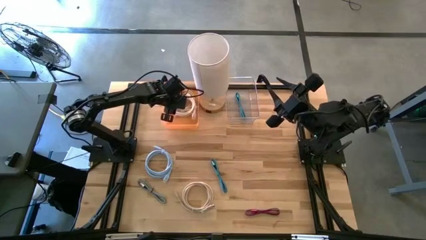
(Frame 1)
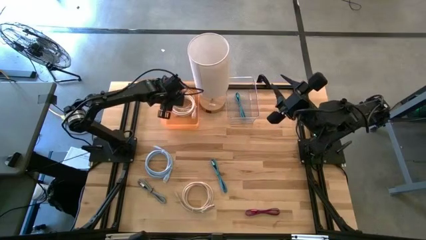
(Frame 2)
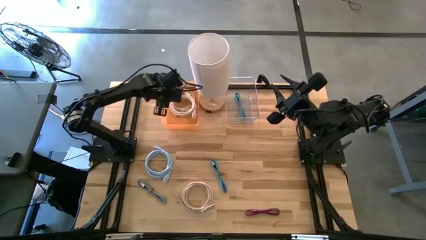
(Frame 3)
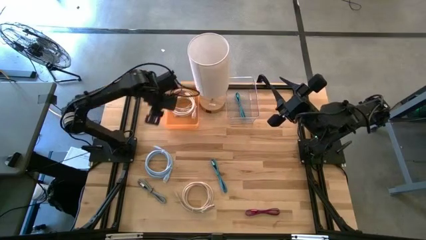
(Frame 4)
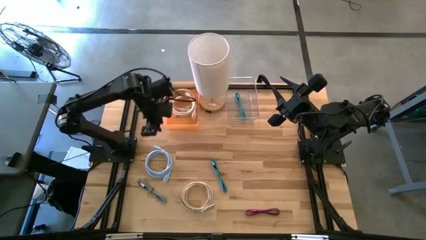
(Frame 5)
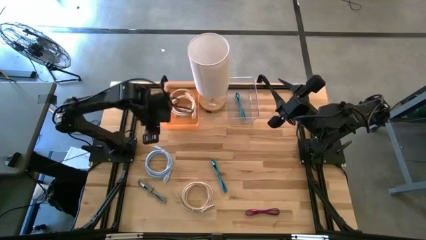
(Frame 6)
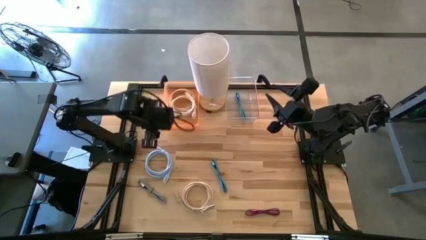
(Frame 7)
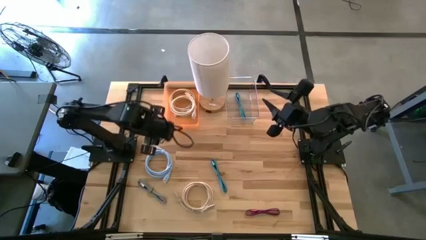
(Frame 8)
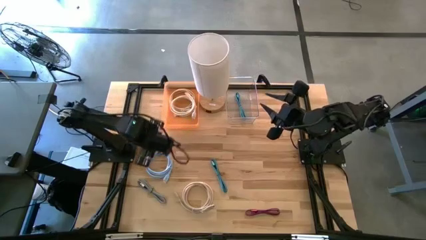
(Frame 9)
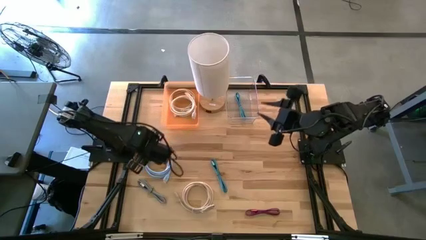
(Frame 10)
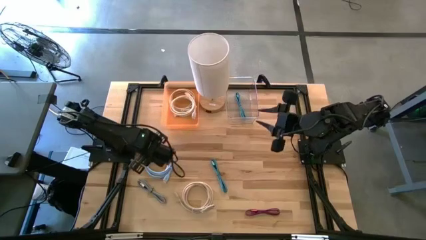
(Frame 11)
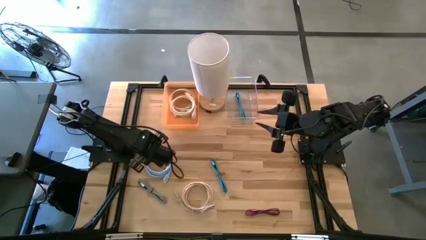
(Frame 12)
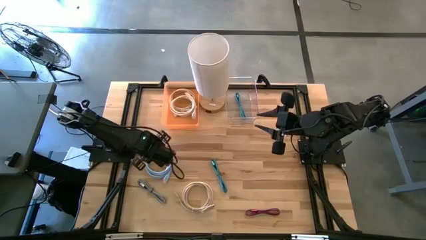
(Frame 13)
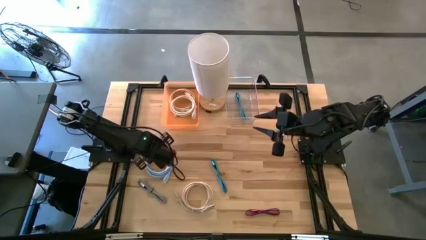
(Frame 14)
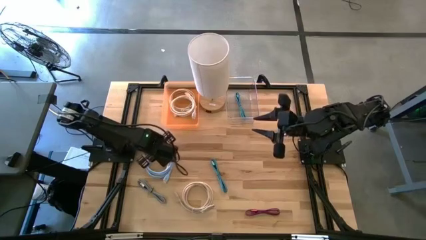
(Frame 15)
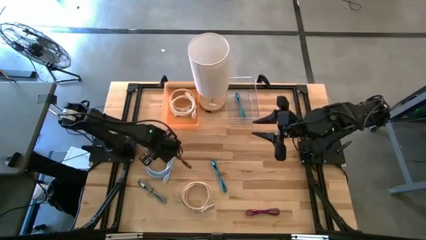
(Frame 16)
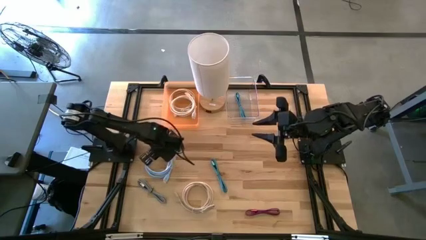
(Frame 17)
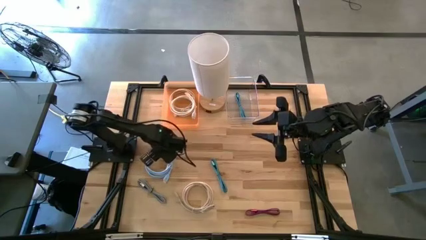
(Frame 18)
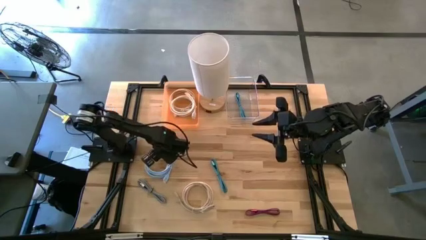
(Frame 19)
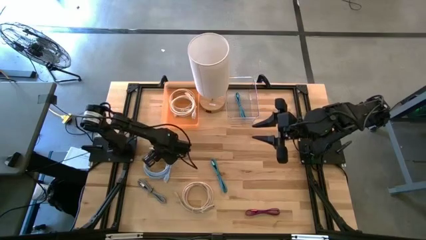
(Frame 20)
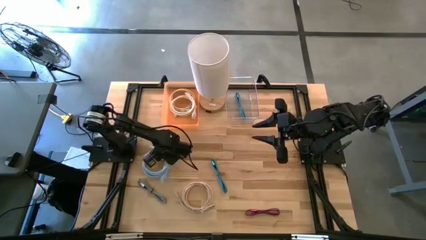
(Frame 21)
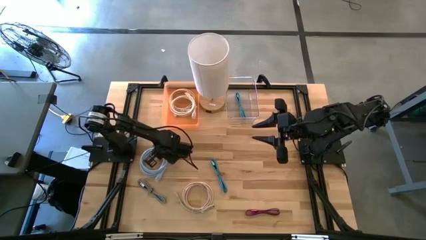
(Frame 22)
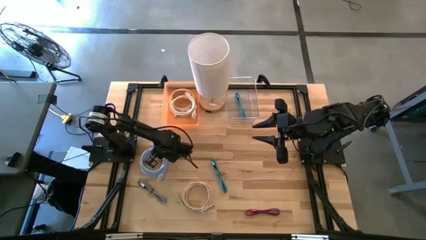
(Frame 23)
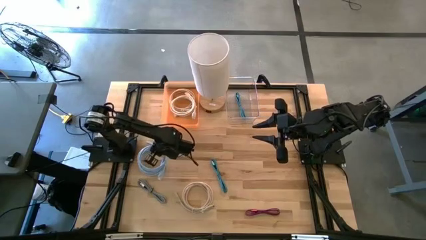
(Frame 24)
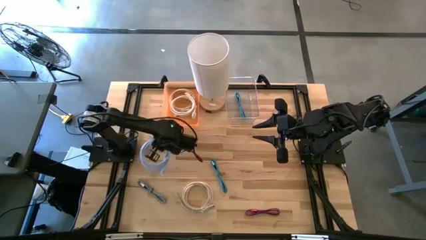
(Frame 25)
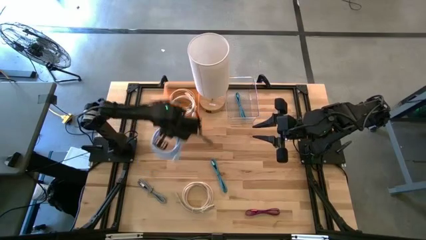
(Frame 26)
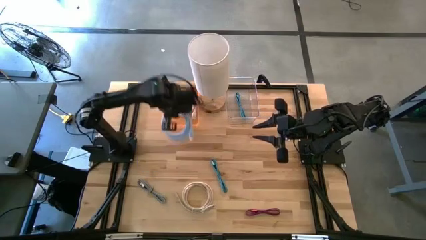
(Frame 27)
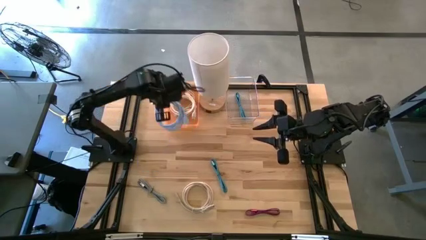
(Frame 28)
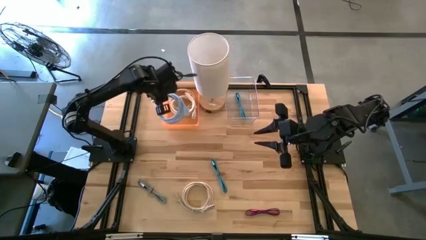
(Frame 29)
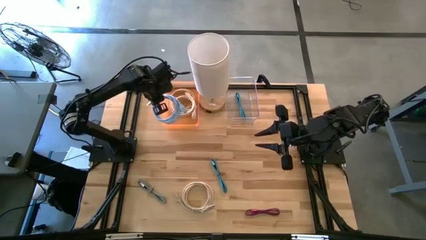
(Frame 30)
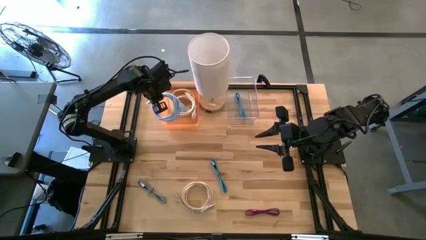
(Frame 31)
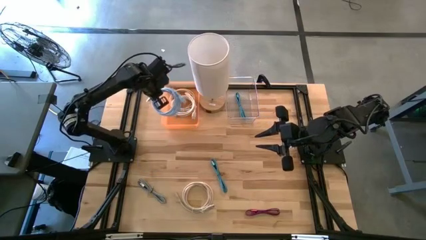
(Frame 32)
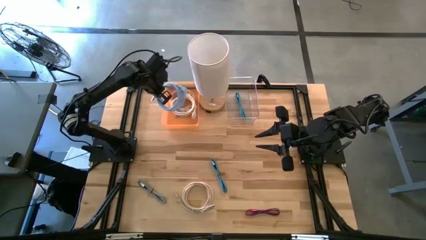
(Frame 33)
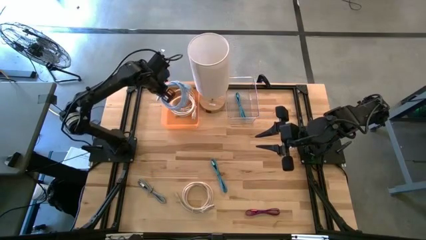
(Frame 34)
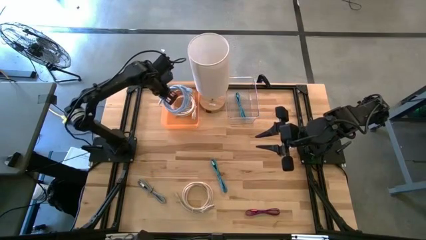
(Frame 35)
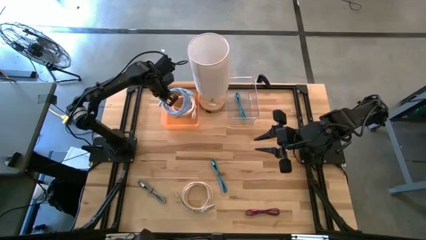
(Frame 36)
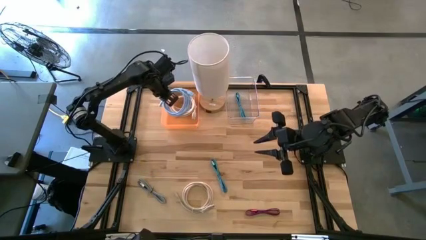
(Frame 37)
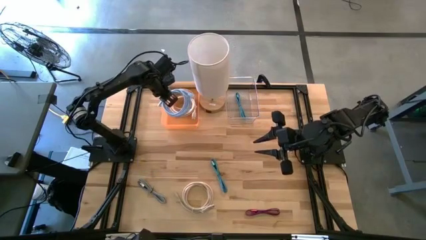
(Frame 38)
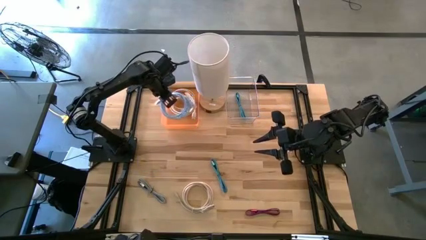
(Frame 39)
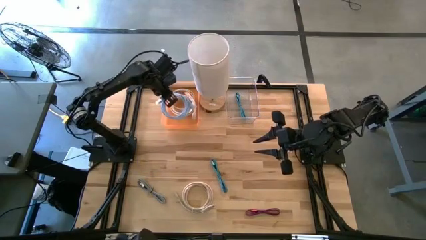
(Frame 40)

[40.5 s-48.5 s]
Task: Pick & Place USB Port
Put the light blue usb cable into the orange bin

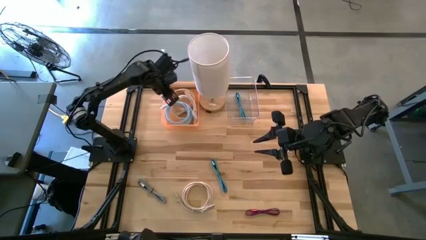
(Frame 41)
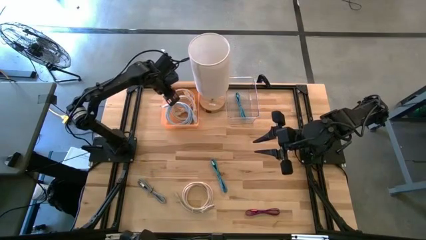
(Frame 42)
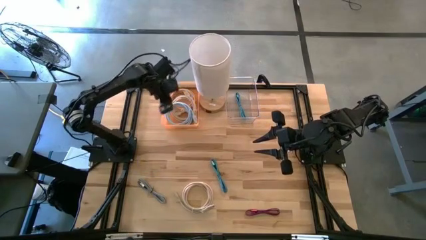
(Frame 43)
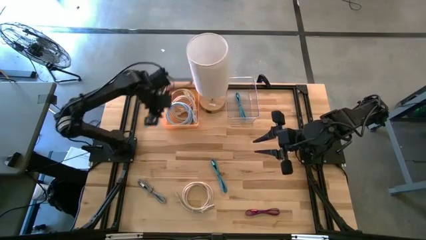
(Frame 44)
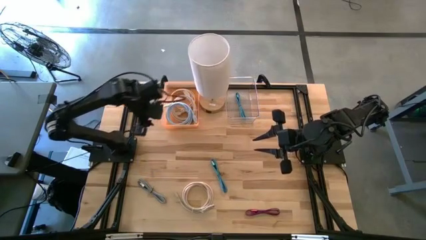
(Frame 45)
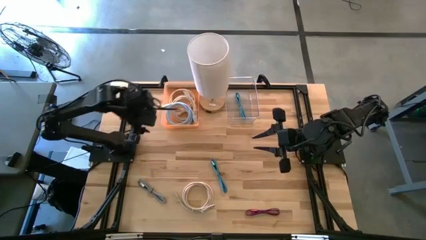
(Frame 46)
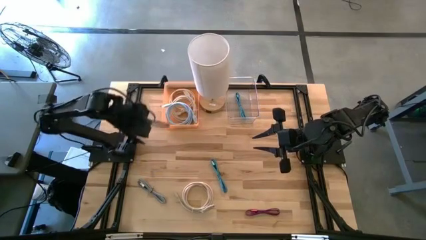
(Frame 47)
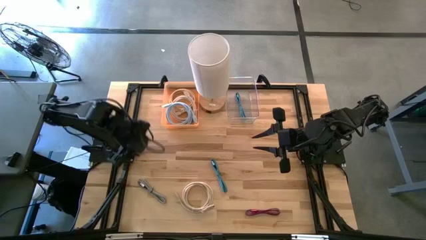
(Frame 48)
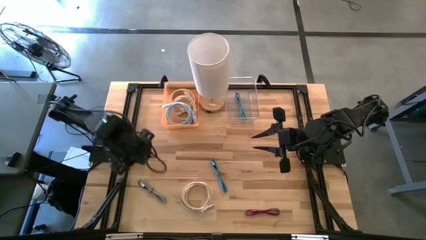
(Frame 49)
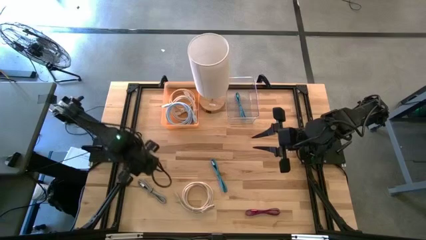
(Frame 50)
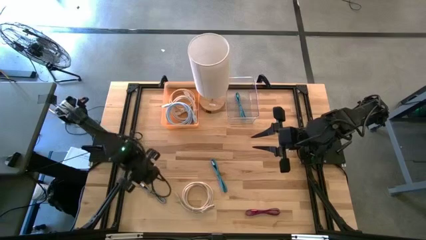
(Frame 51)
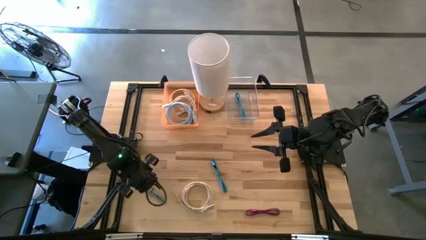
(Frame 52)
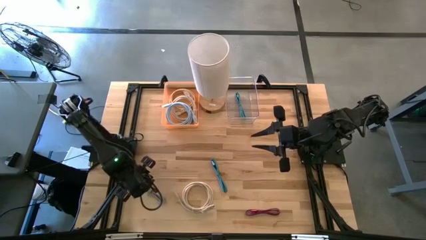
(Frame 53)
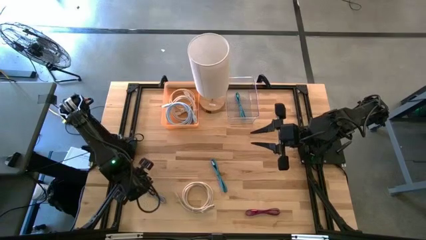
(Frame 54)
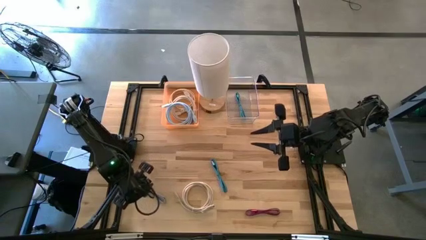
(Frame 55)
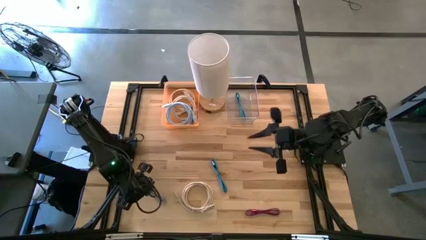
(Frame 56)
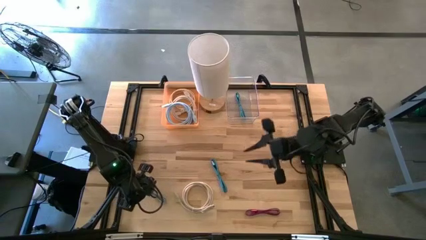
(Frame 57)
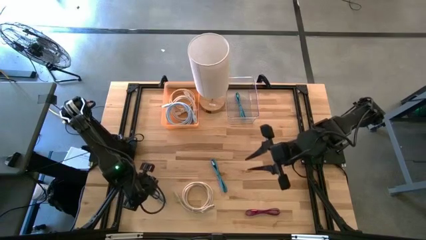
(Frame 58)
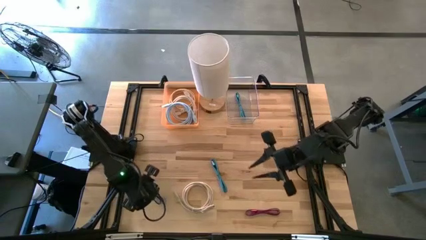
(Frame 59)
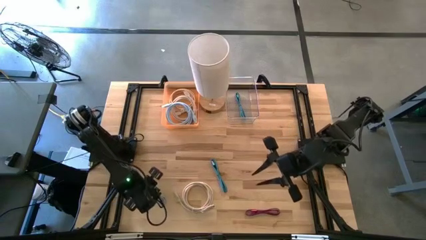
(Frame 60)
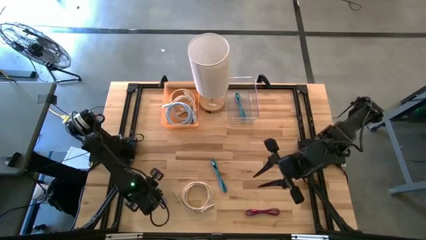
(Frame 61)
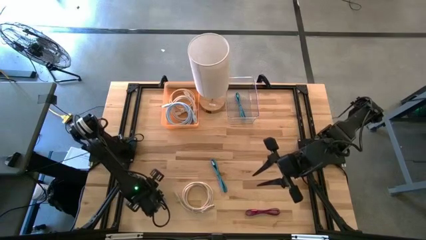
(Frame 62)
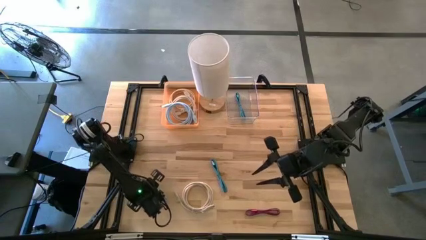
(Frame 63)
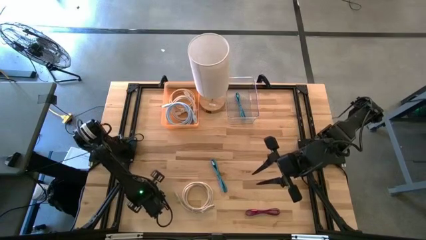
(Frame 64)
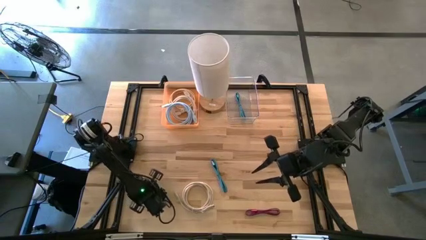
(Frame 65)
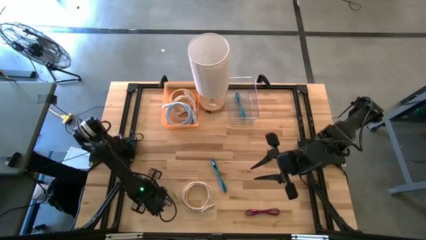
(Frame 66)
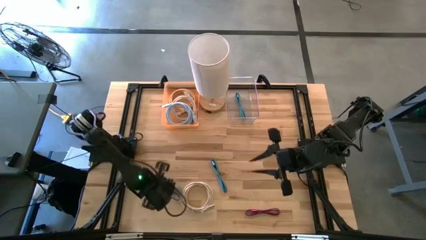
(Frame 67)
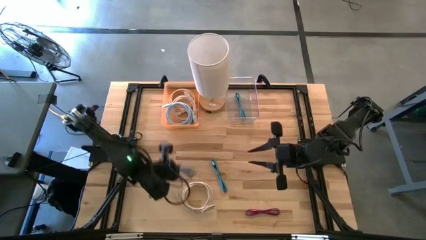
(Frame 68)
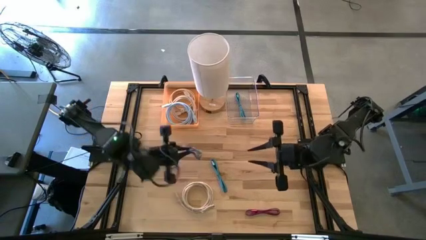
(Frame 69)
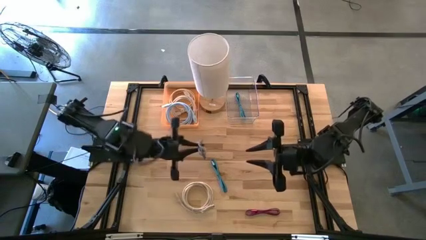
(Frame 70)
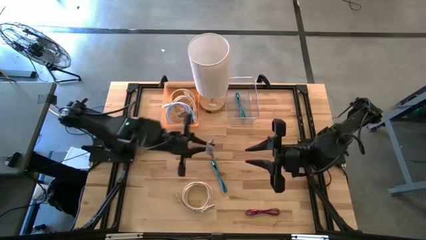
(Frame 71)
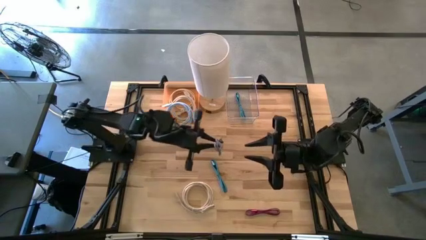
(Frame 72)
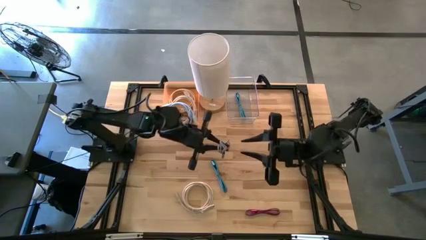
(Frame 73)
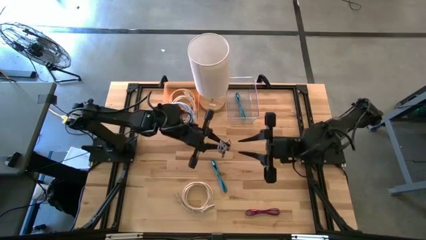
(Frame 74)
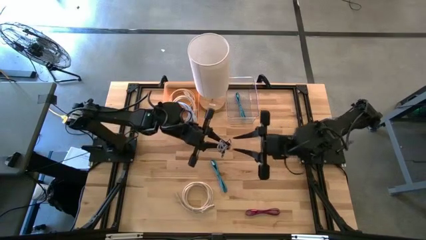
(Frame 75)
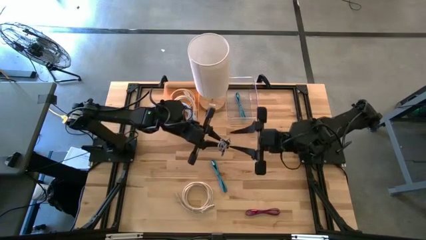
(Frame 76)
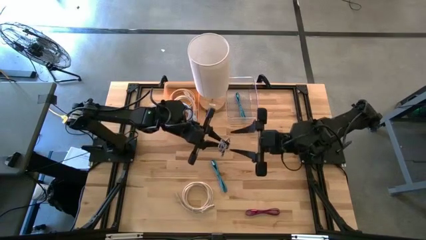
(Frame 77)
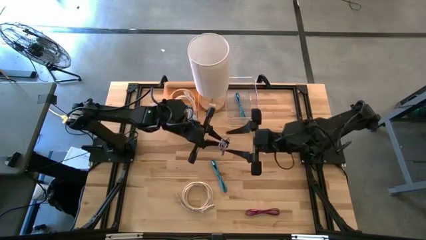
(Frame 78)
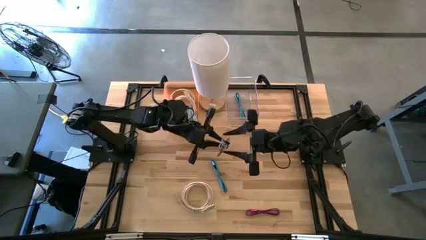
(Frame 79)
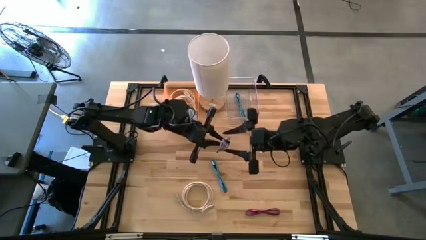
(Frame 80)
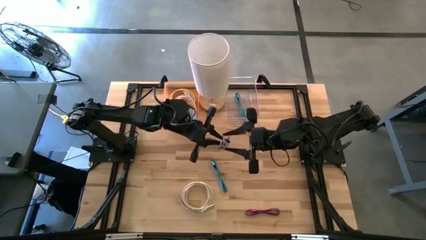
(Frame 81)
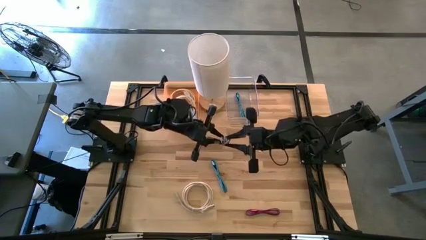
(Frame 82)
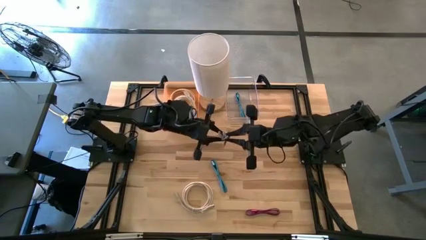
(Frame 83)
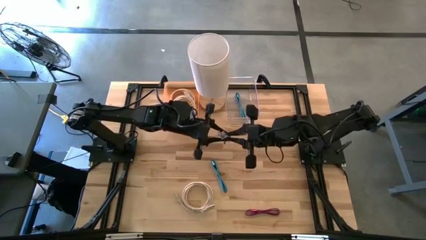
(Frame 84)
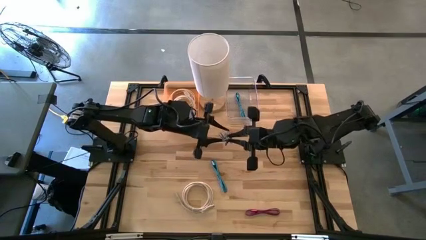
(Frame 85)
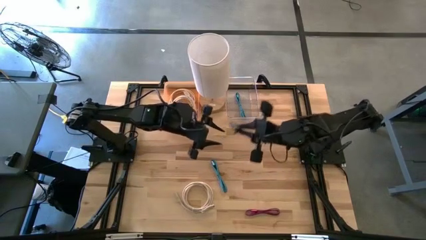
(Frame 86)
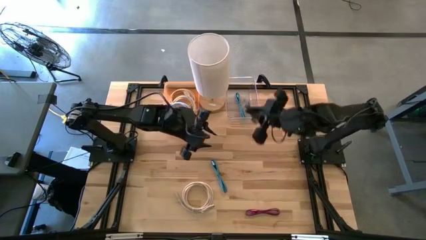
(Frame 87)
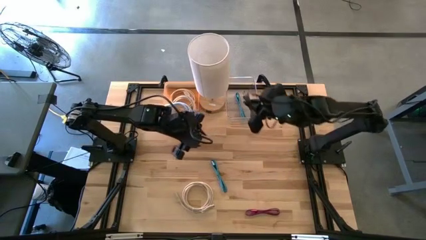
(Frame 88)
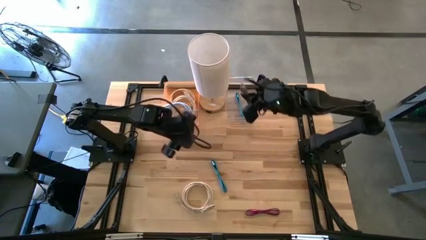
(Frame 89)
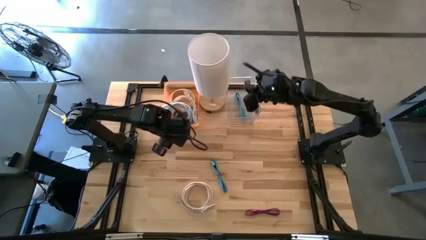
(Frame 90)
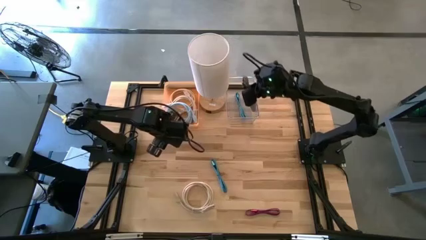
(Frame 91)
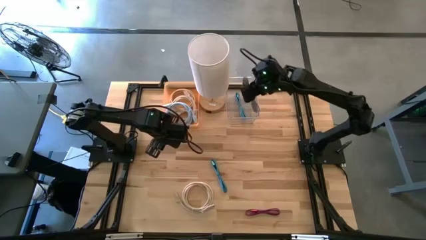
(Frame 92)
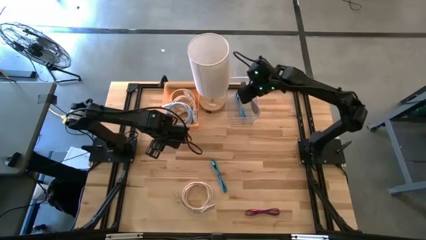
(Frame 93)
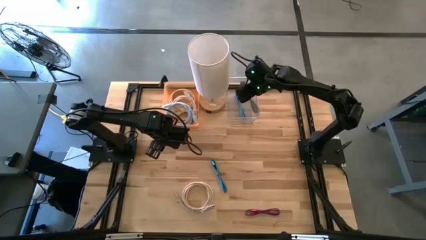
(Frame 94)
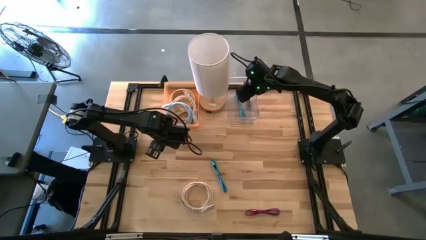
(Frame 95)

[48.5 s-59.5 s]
Put the black and white charger cable into the transparent bin
